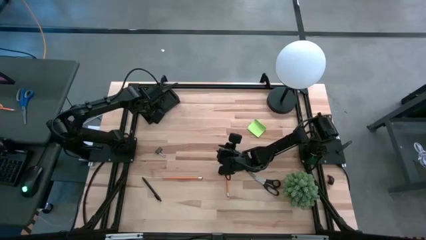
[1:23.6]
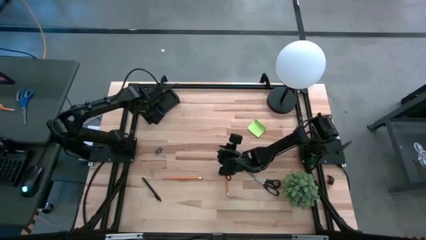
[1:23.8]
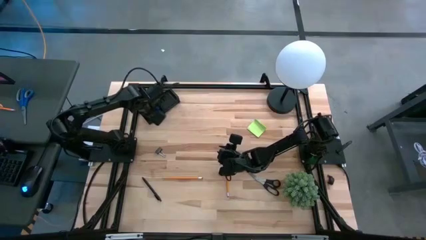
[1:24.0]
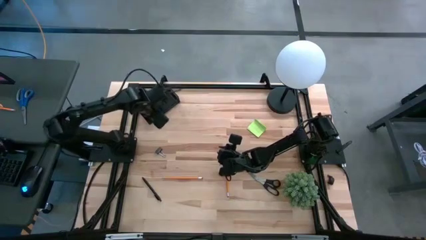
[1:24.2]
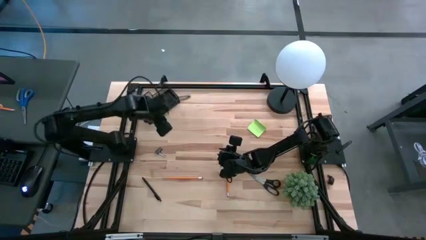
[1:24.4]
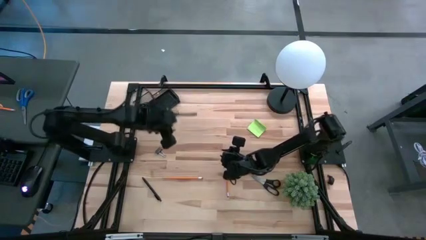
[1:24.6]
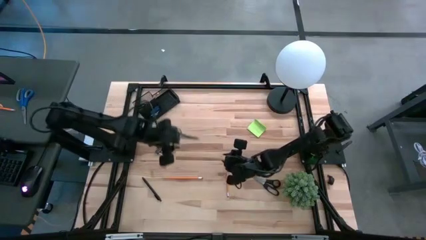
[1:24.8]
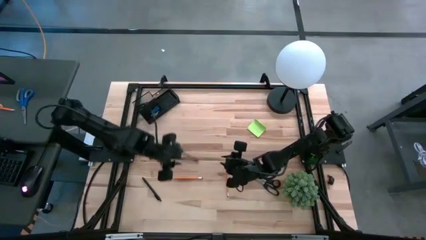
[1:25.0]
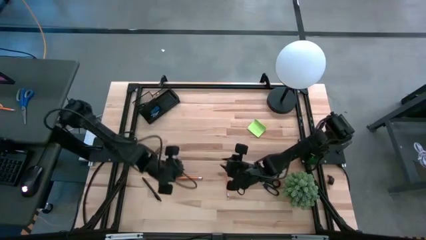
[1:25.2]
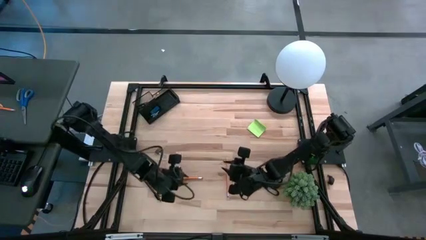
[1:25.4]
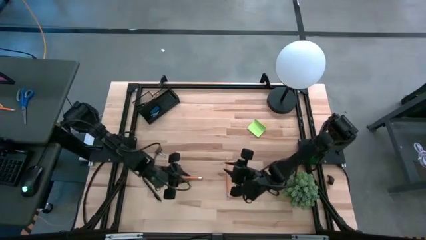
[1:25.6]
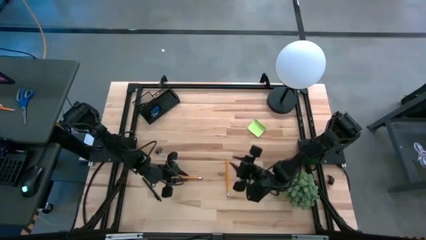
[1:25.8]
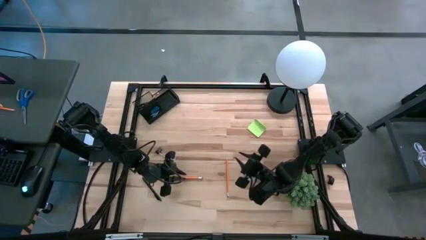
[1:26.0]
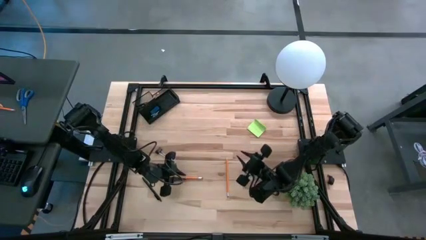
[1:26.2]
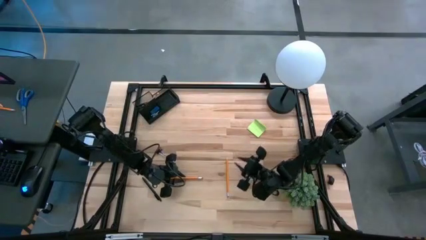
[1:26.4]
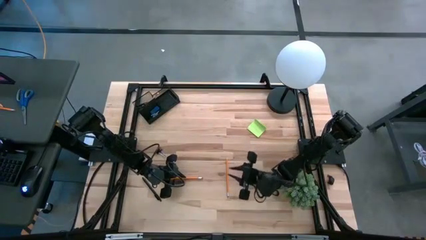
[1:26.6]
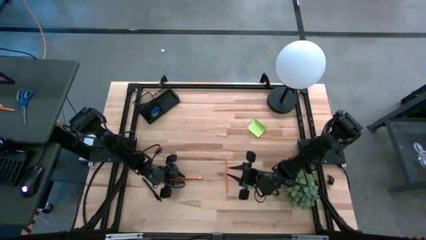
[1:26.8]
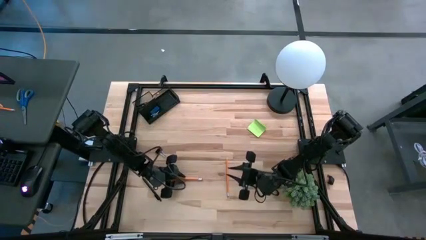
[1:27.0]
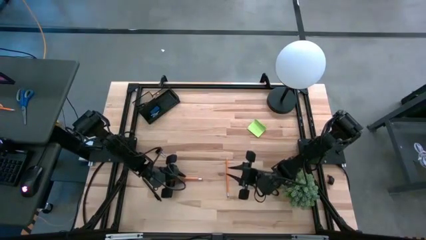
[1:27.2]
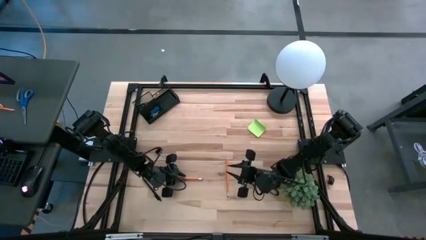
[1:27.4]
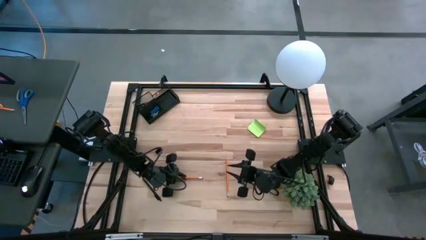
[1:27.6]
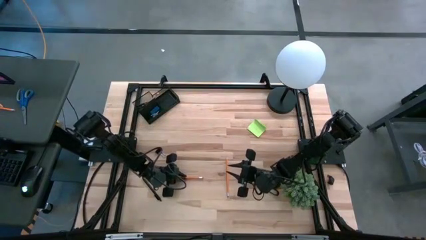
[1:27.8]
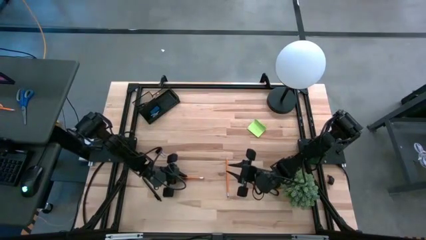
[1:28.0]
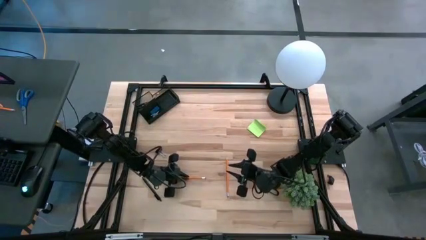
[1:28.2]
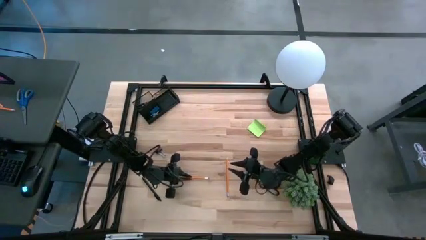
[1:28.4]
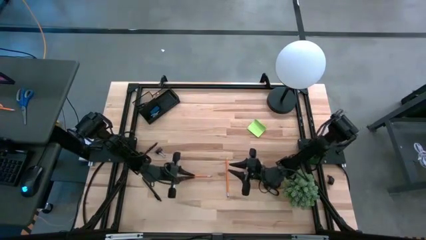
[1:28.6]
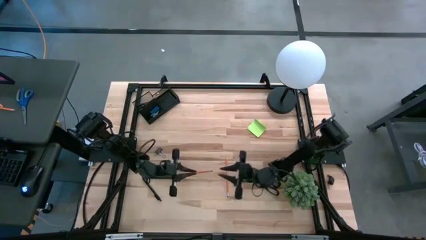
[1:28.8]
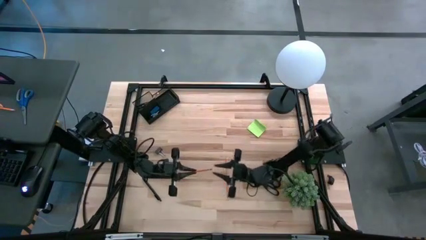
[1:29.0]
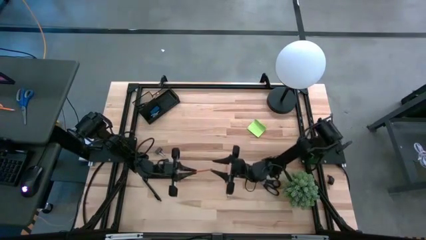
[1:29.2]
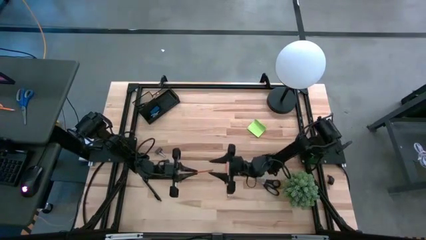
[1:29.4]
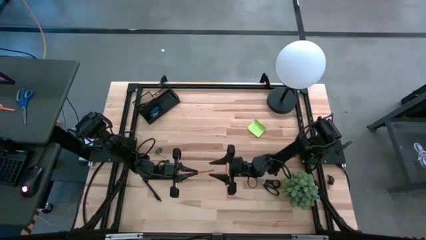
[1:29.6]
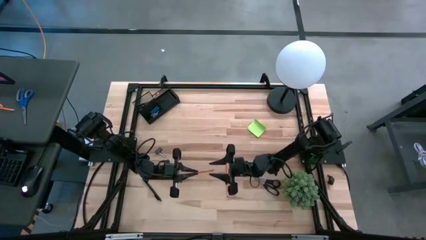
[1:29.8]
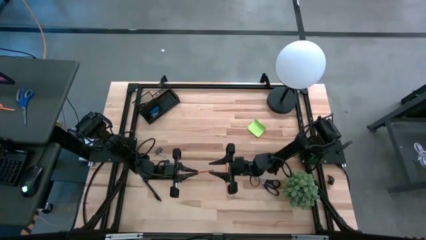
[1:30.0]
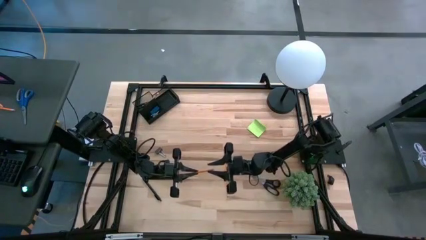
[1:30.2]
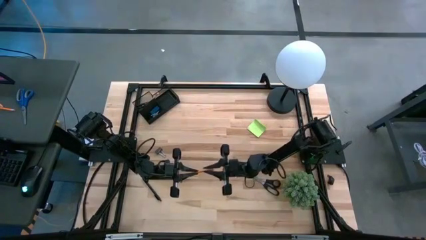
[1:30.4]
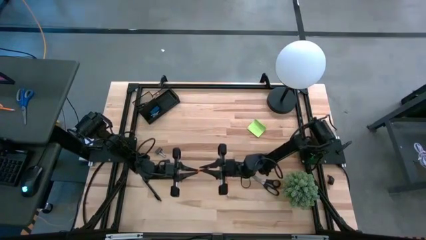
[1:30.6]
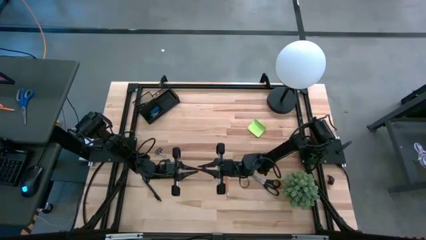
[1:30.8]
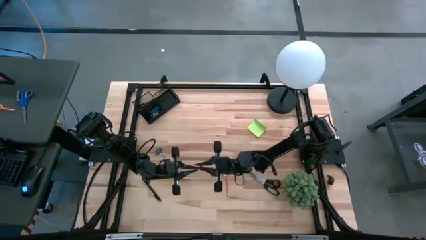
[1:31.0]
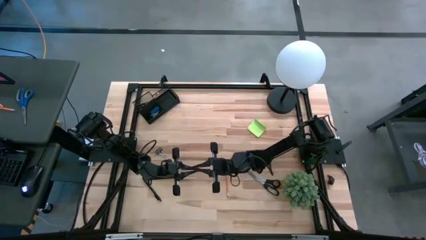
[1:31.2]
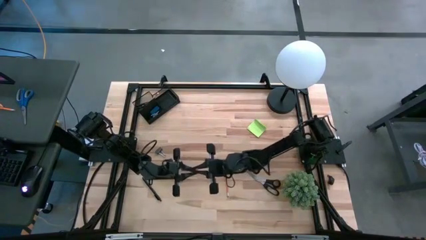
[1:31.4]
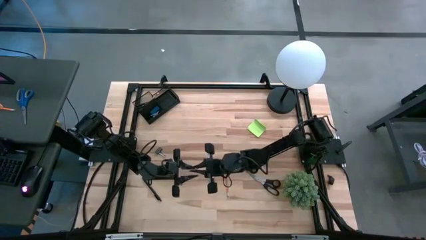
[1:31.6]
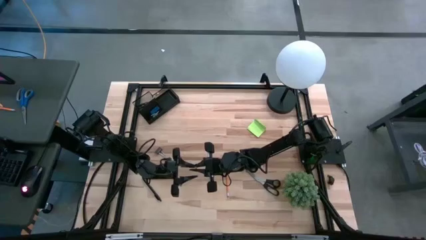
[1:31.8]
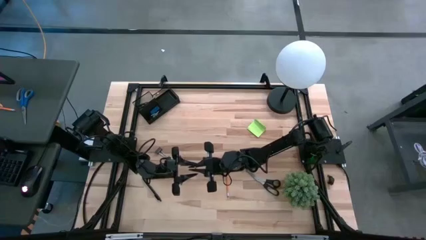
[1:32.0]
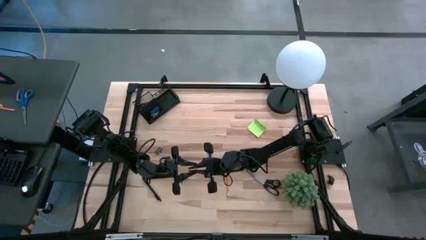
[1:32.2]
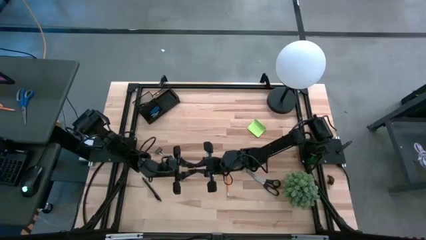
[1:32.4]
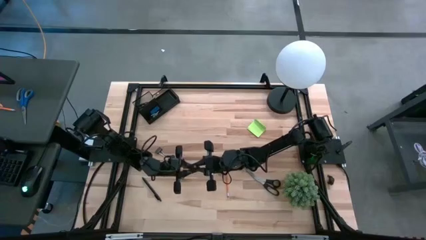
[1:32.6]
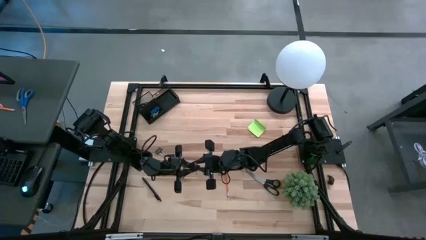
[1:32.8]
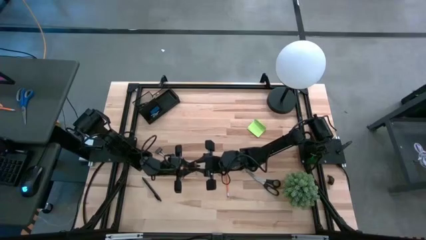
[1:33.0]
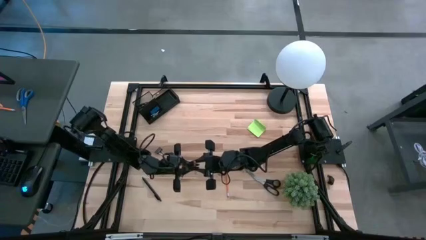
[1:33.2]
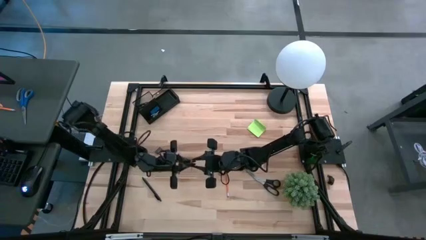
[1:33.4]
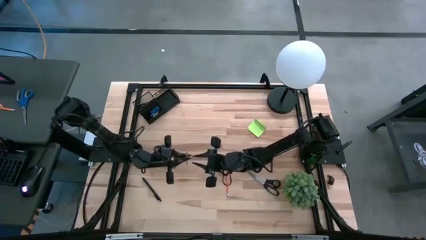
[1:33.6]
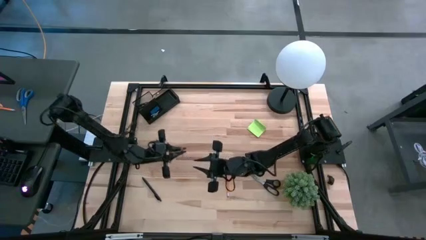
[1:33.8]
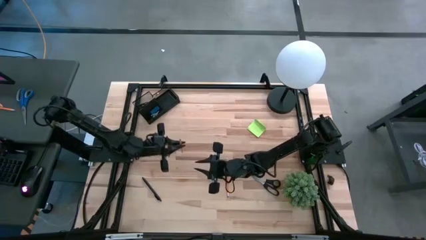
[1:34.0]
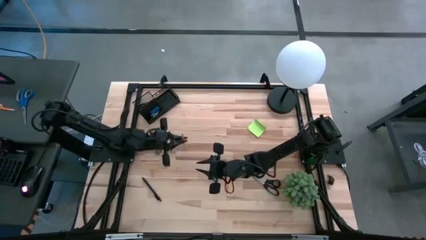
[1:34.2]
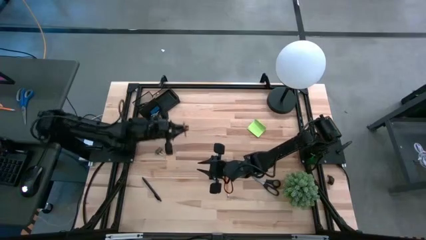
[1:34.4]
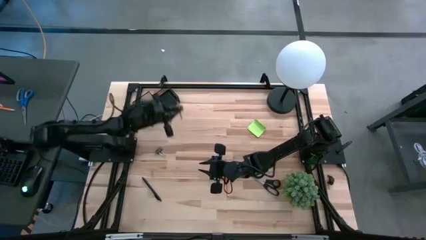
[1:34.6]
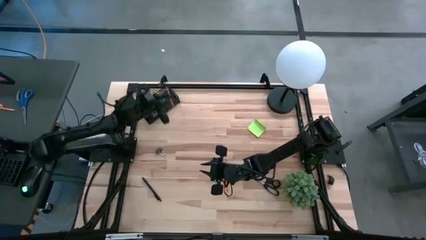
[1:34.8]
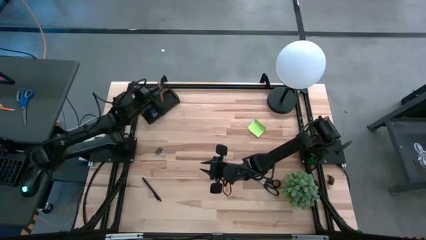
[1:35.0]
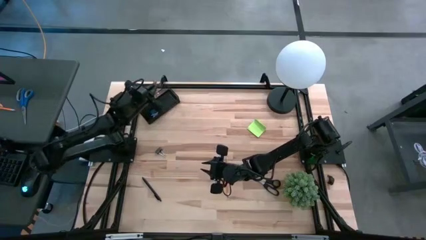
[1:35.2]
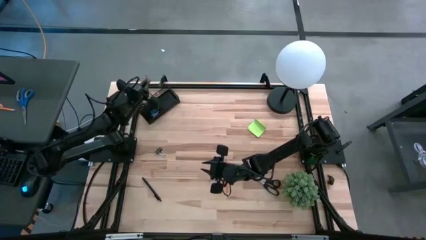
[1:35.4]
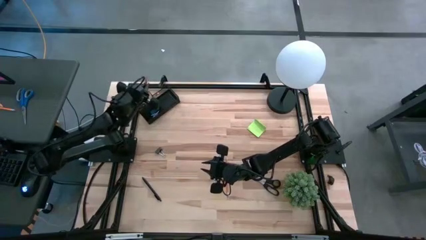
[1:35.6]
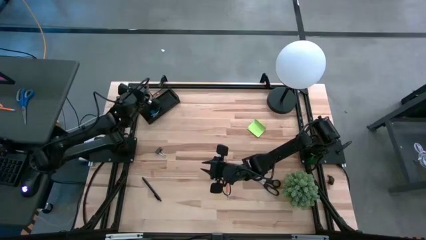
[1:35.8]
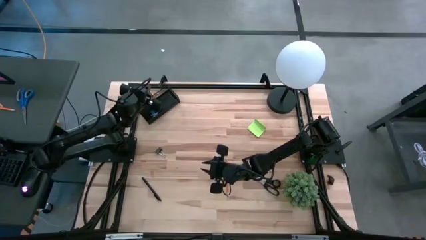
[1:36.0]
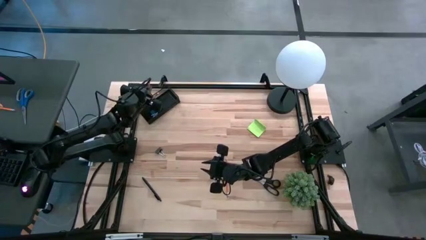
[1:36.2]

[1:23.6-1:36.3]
Task: Pick and place office supplies into organizer
Put the orange pencil into the top left section of the desk organizer
